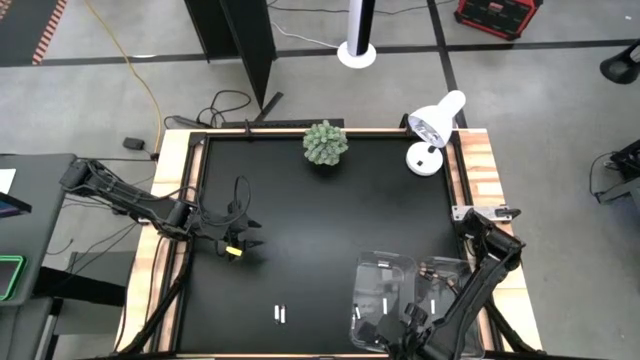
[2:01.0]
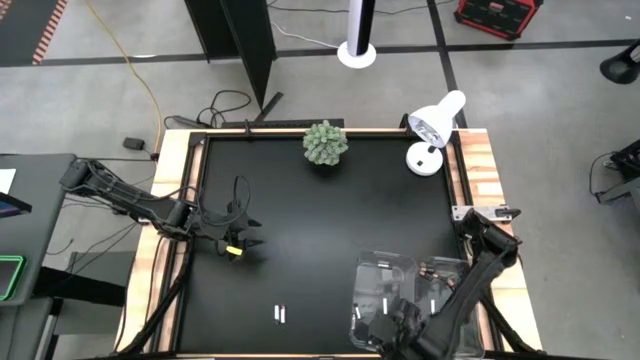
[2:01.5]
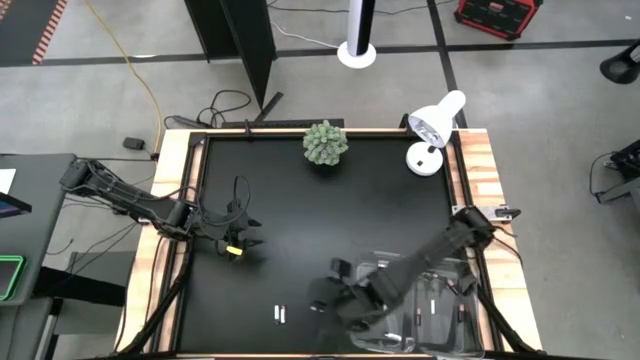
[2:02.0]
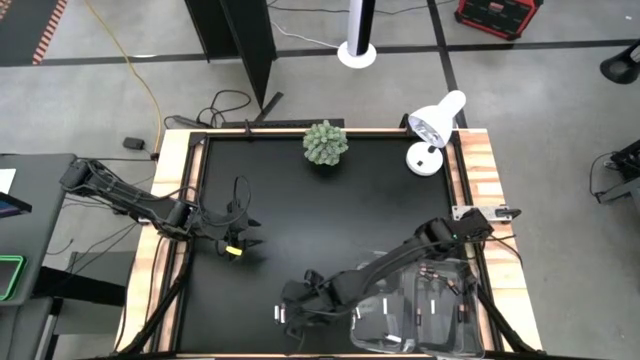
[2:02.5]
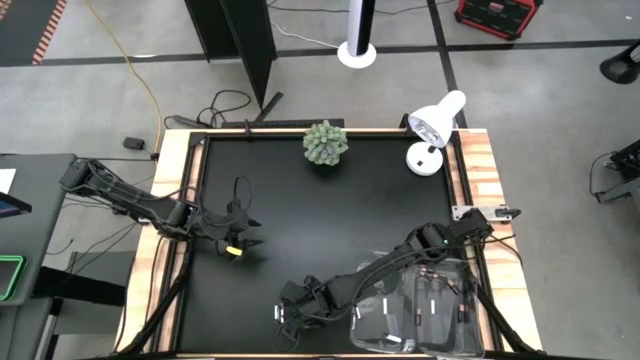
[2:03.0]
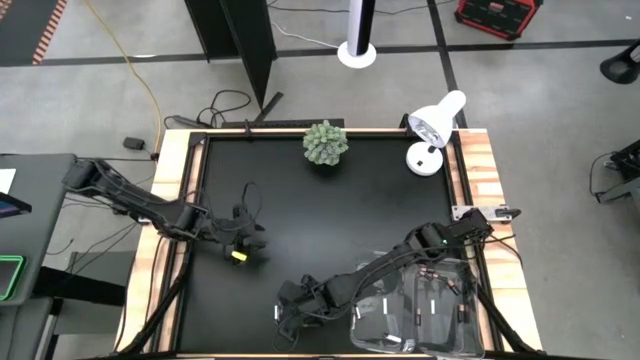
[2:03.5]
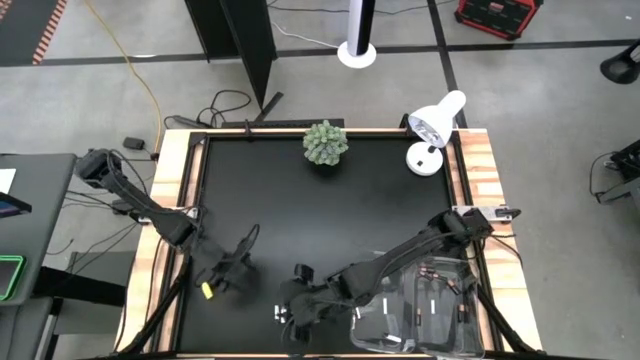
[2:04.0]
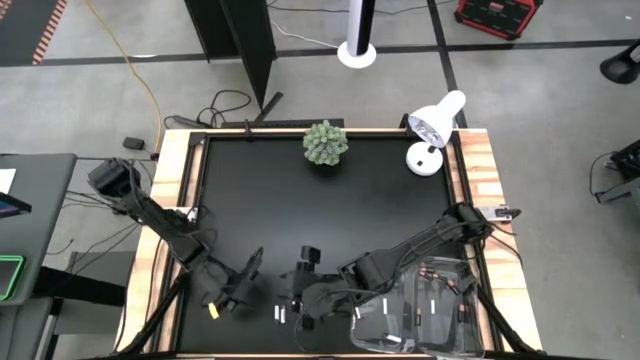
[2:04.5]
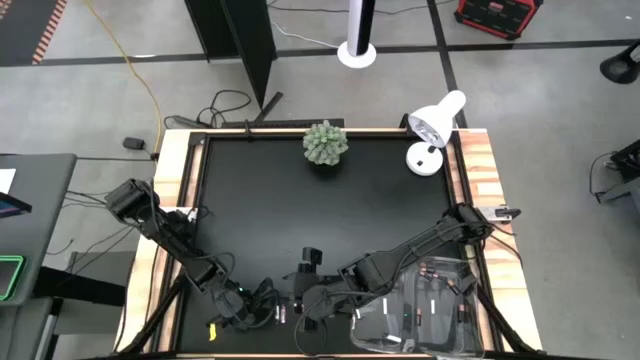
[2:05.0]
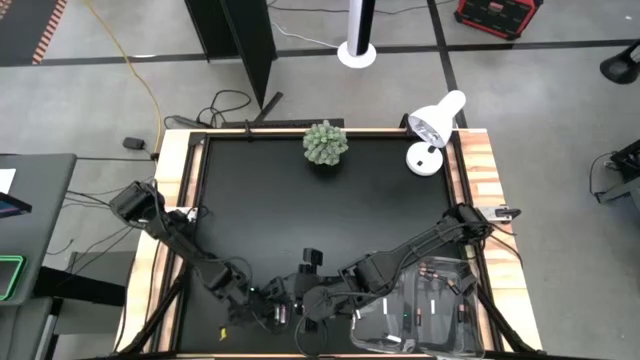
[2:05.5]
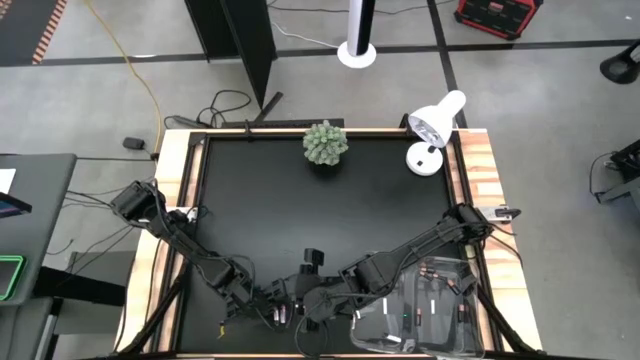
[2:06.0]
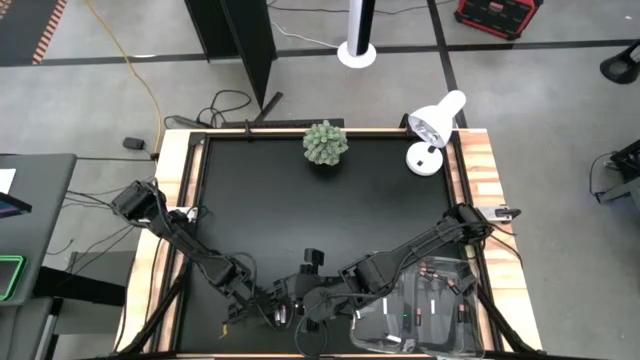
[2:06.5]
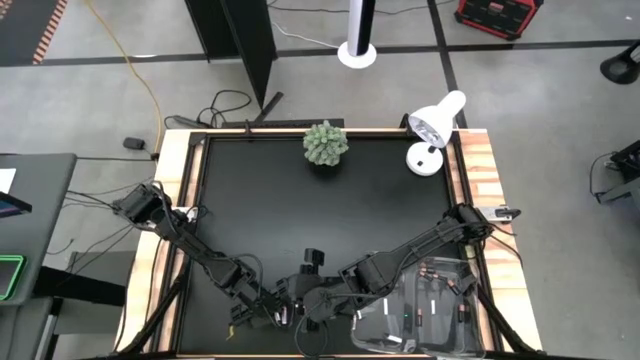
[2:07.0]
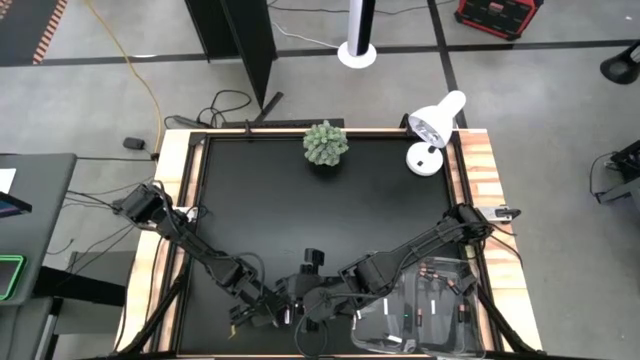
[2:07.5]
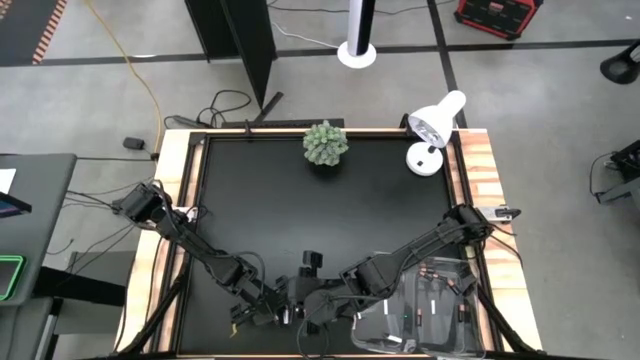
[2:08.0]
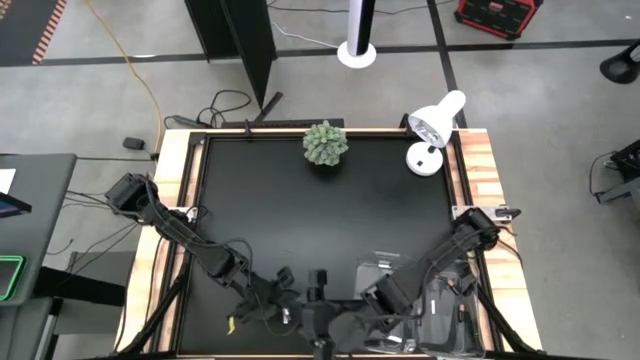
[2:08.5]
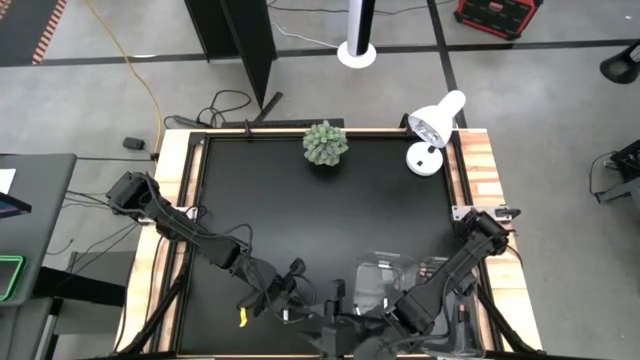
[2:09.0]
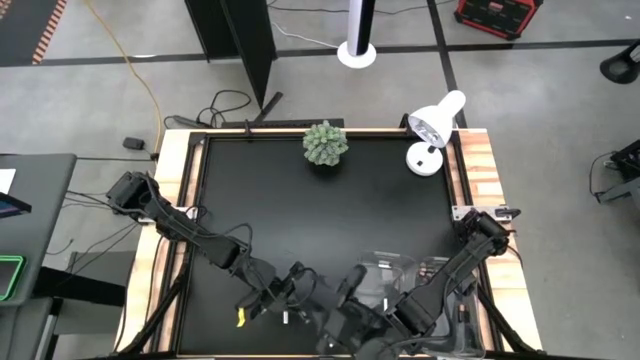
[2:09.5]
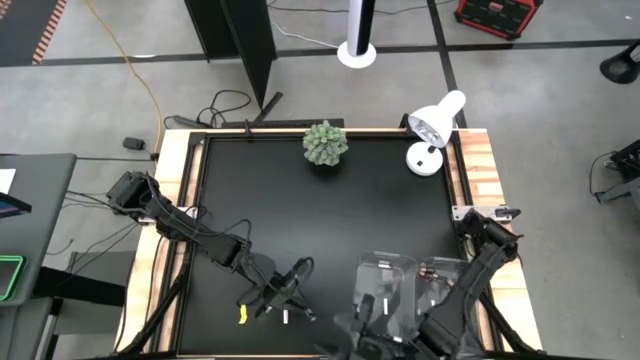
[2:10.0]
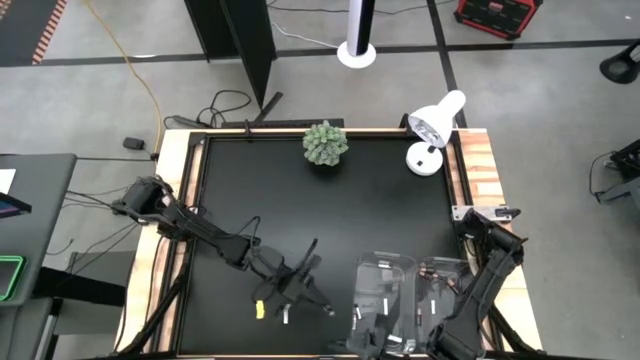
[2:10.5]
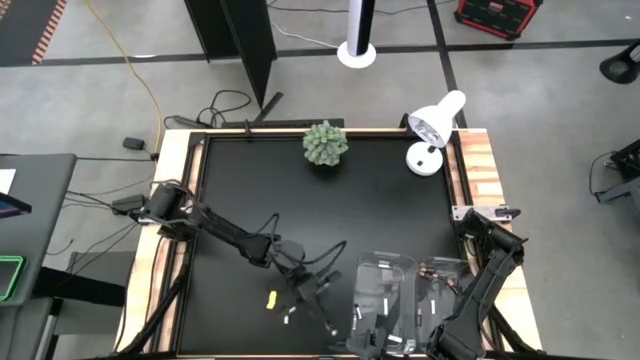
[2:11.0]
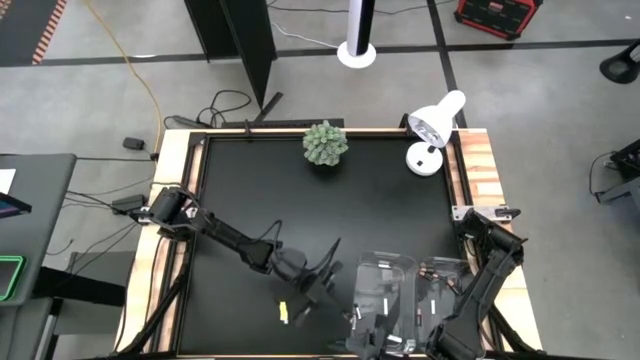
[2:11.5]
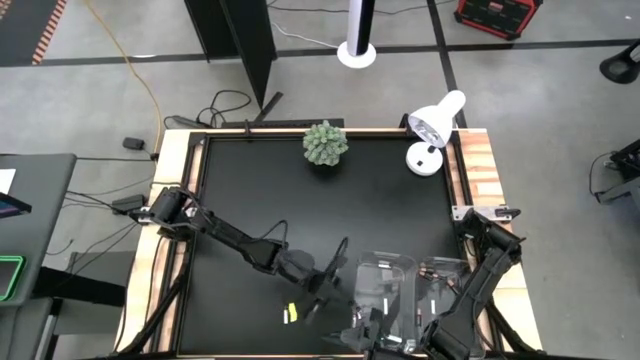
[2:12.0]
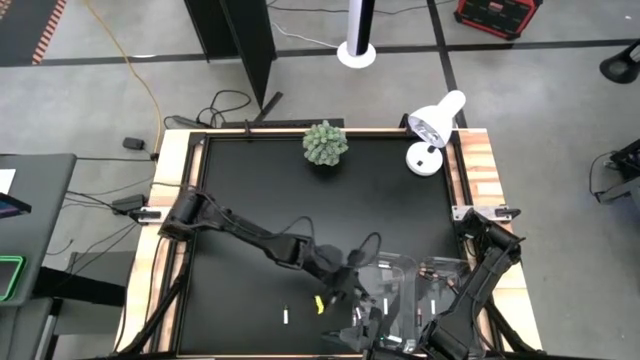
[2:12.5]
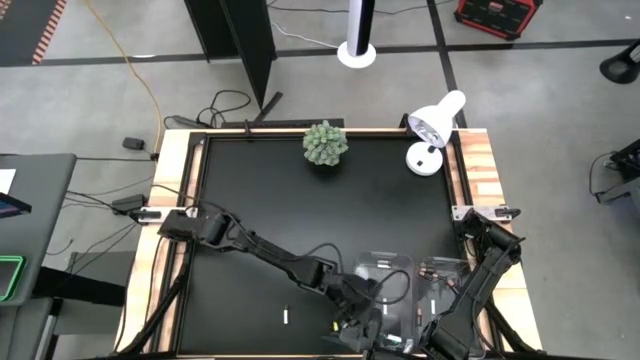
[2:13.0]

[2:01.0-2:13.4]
Task: Sort batteries
Put the silver battery into the left transparent bin

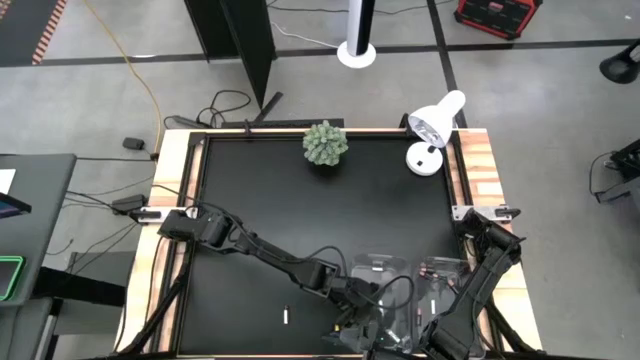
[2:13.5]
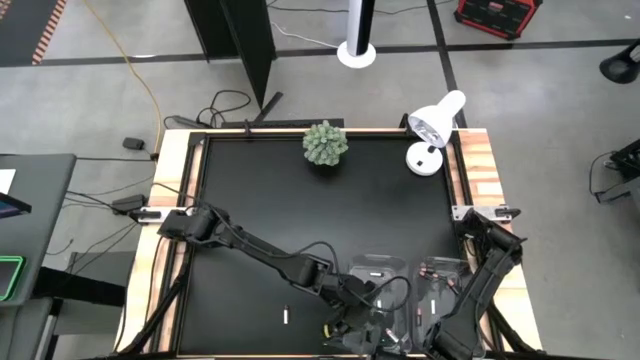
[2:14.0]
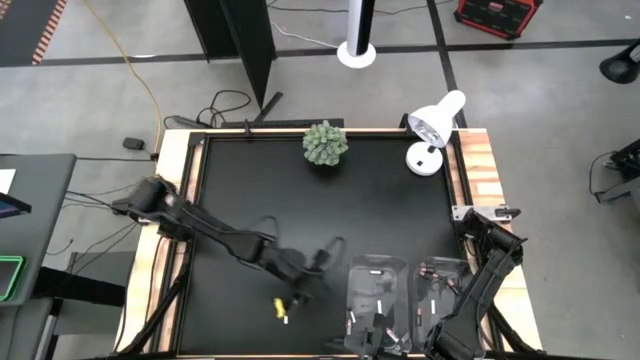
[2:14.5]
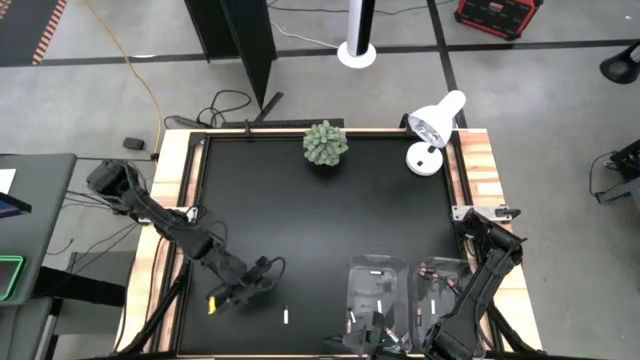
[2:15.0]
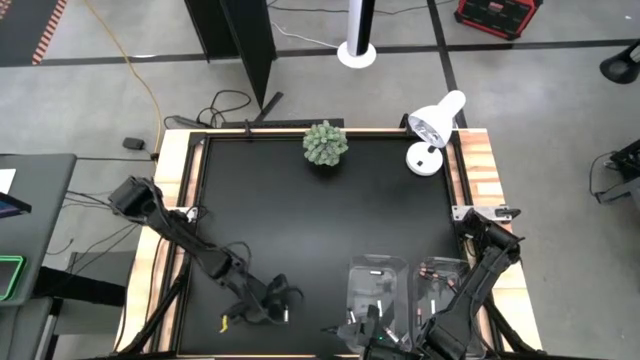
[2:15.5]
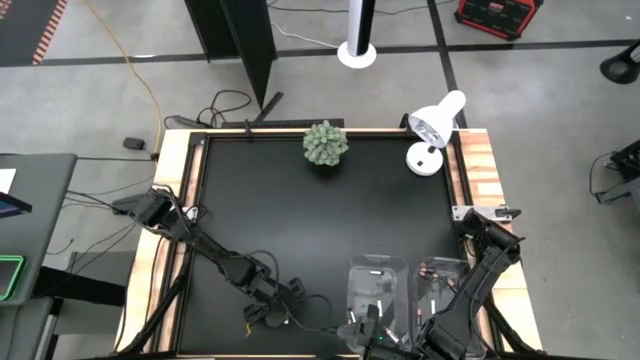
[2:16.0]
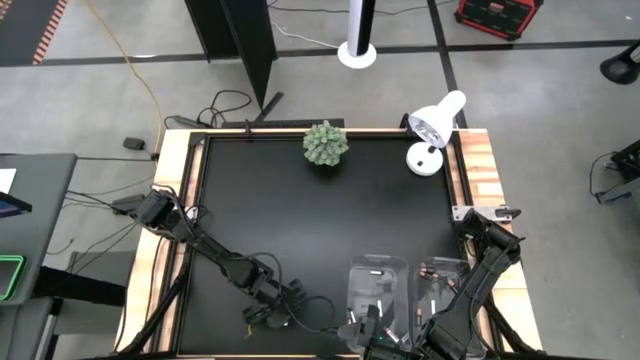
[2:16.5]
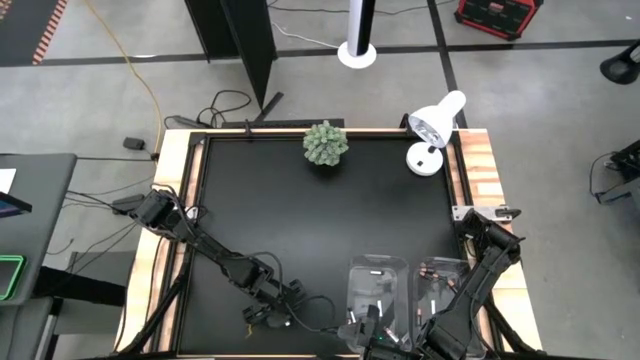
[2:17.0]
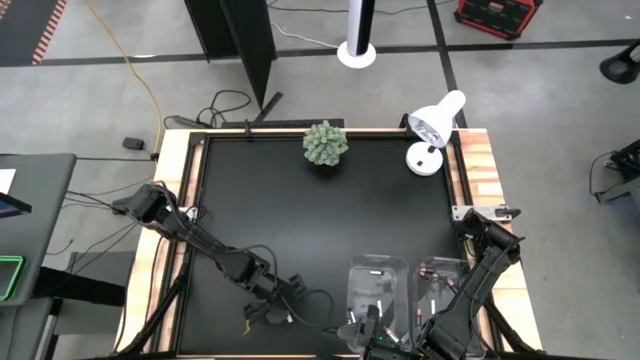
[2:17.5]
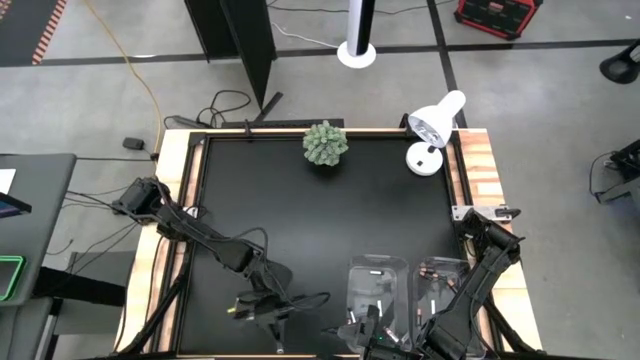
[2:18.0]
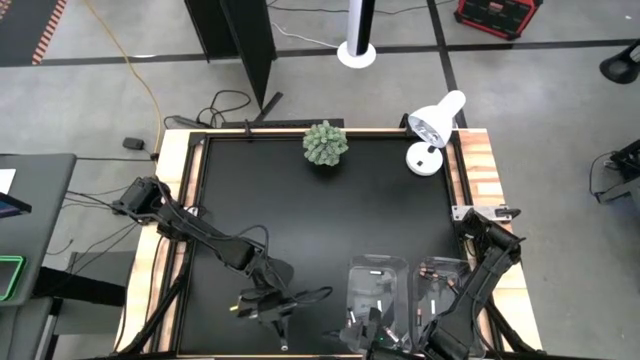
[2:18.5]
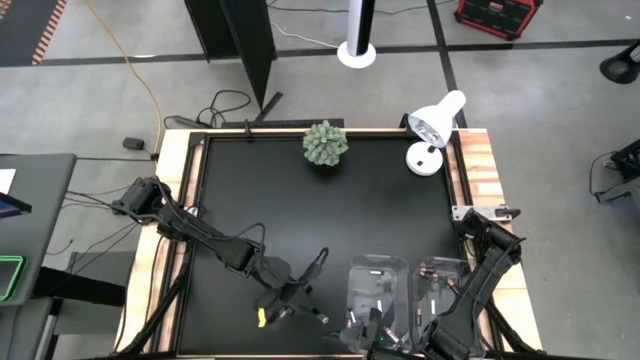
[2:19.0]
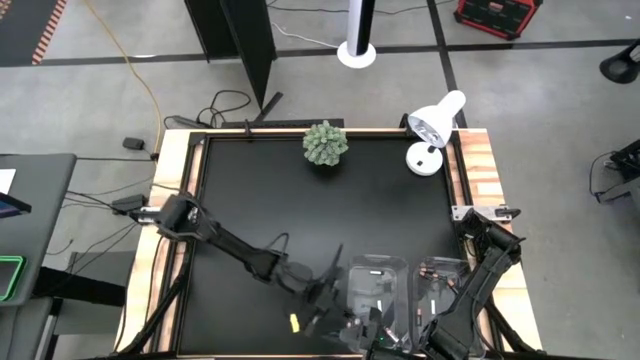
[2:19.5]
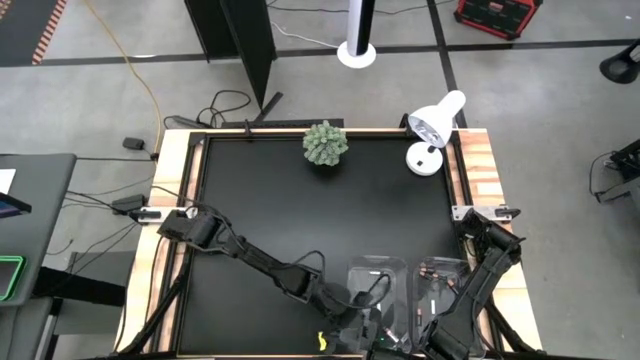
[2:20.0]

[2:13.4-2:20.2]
Put the silver battery into the left transparent bin
